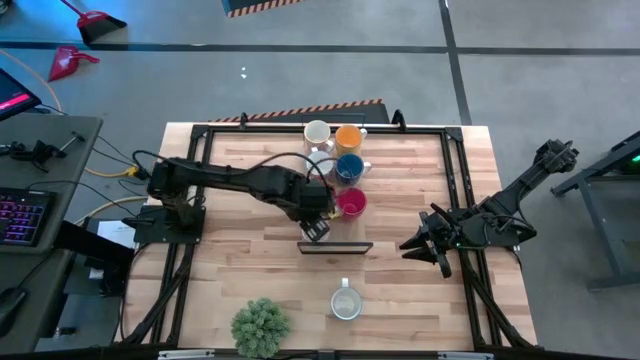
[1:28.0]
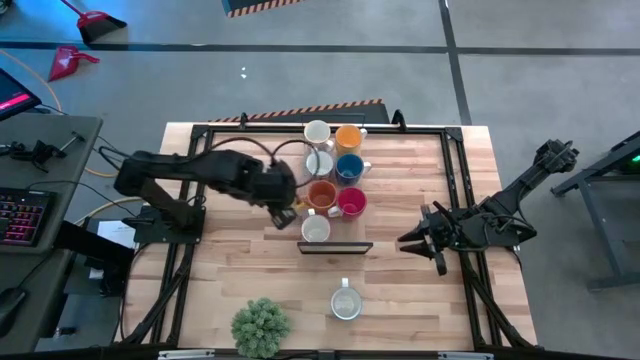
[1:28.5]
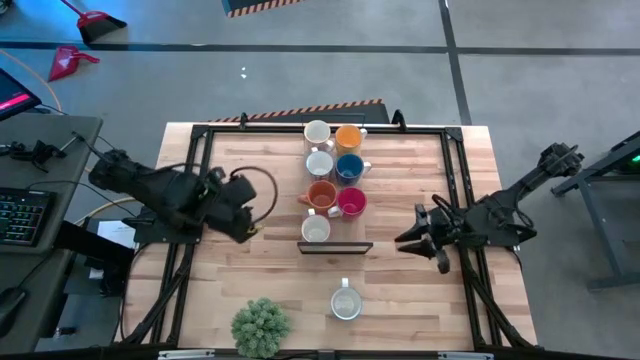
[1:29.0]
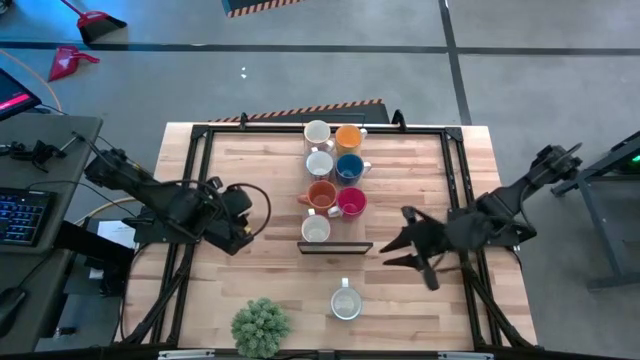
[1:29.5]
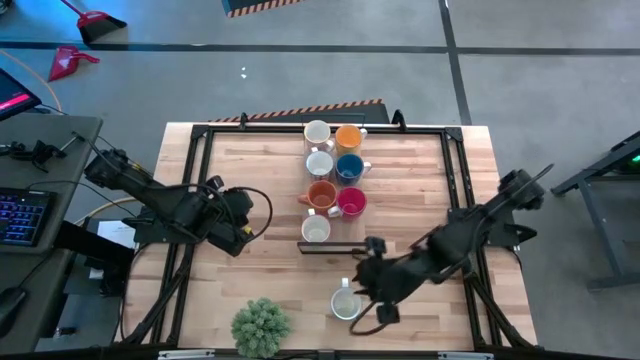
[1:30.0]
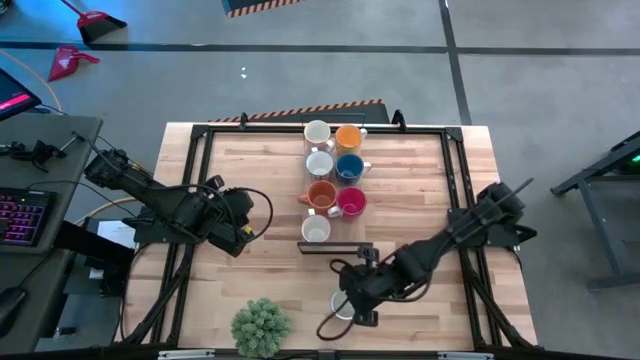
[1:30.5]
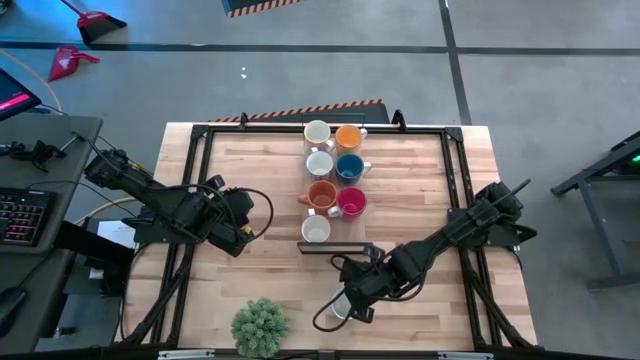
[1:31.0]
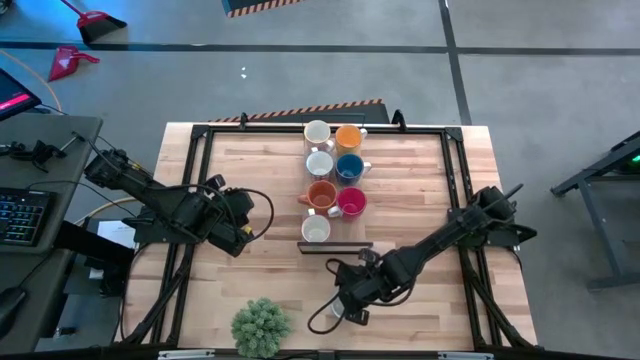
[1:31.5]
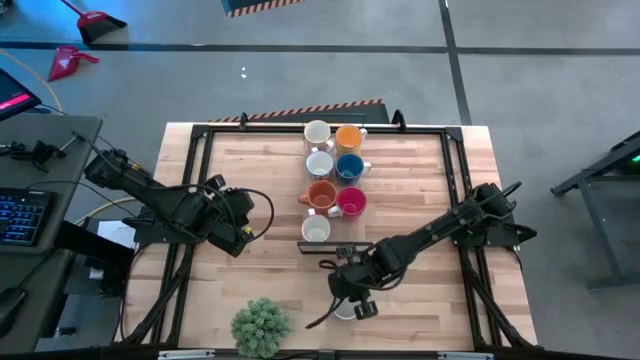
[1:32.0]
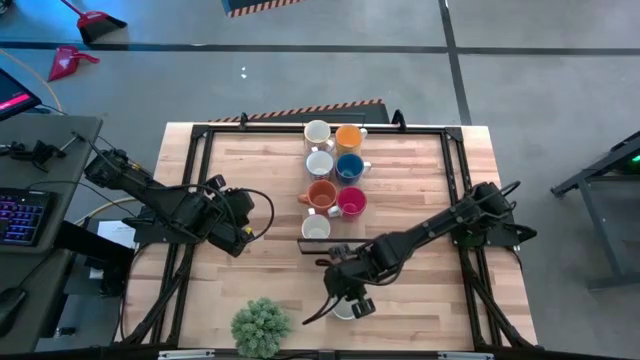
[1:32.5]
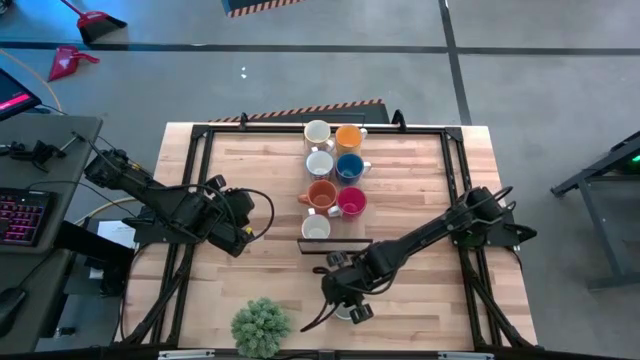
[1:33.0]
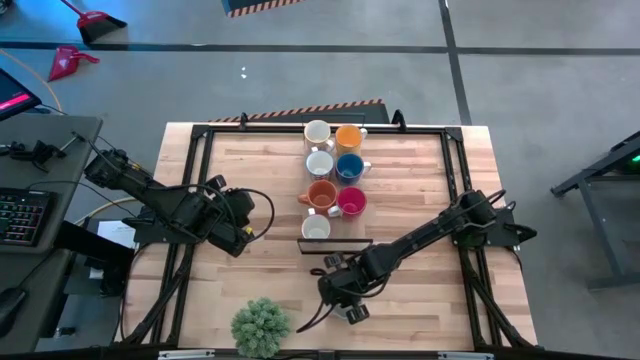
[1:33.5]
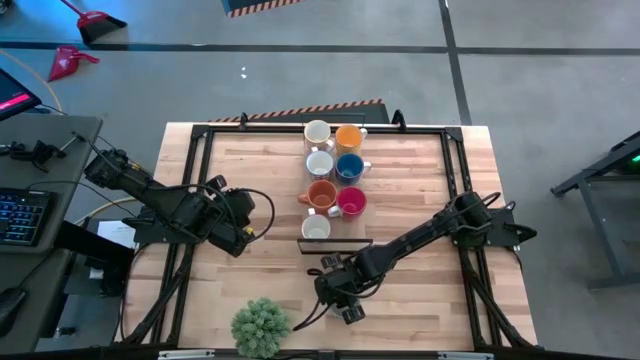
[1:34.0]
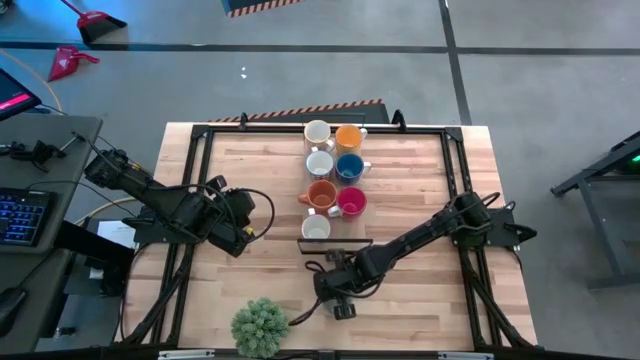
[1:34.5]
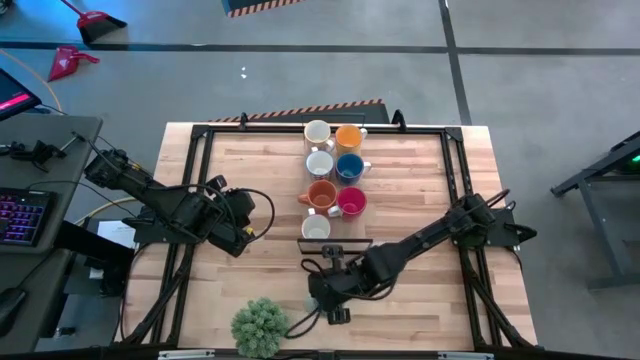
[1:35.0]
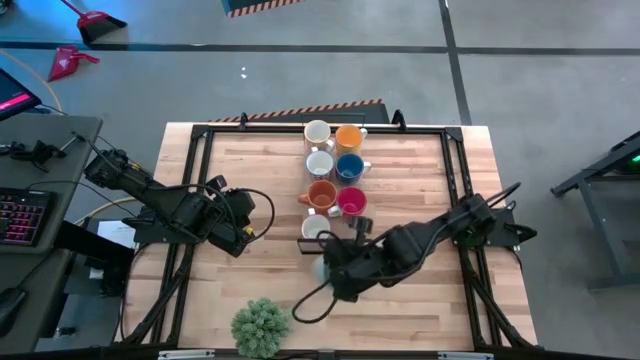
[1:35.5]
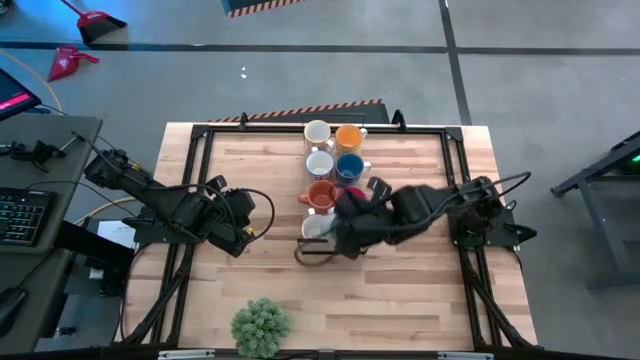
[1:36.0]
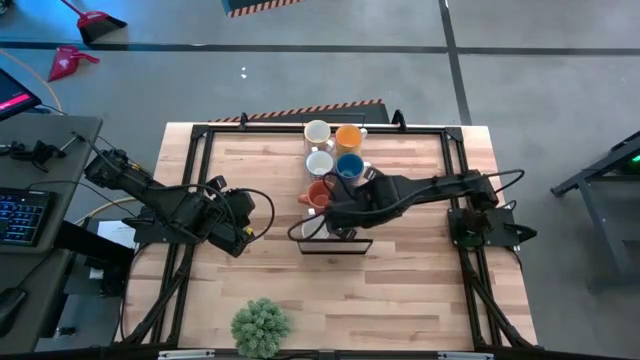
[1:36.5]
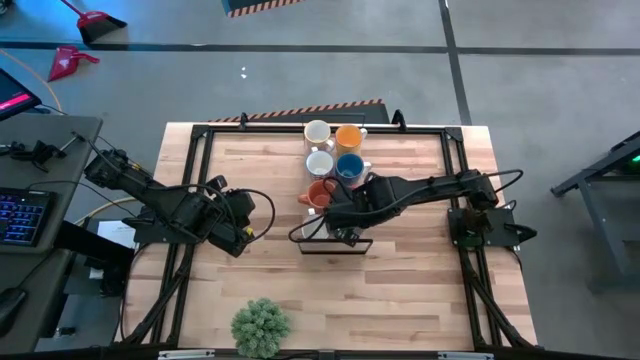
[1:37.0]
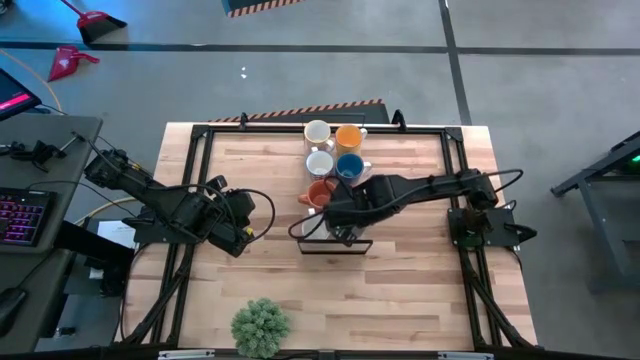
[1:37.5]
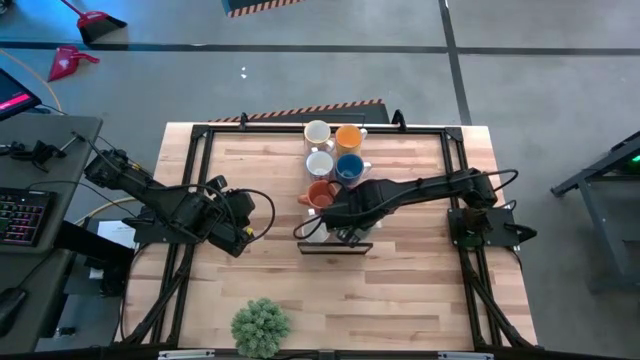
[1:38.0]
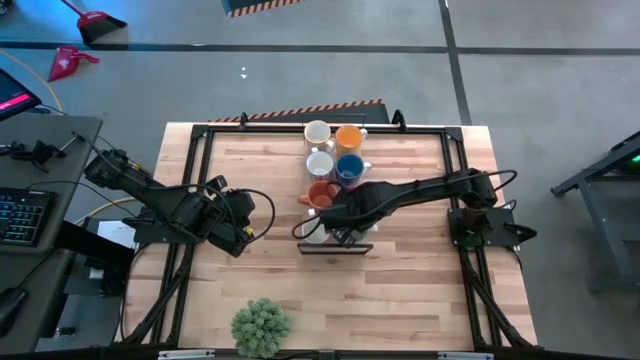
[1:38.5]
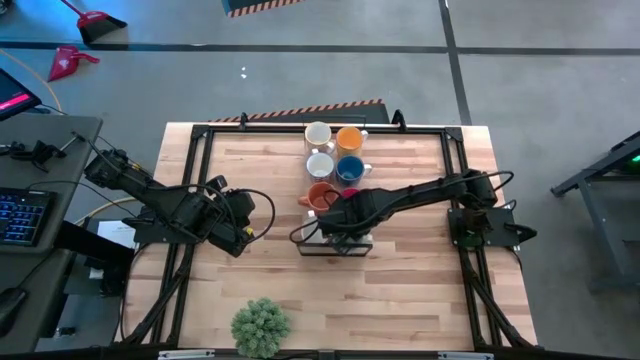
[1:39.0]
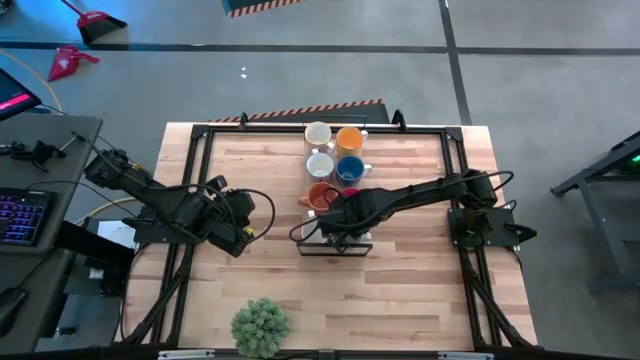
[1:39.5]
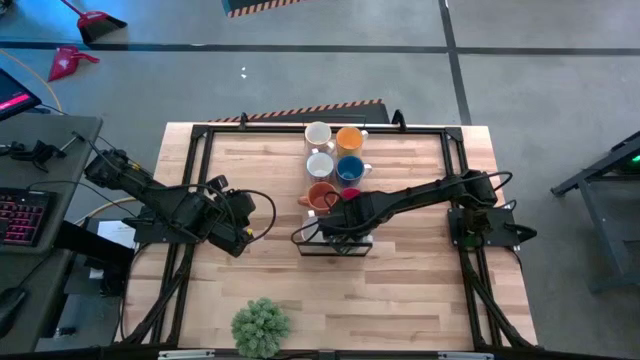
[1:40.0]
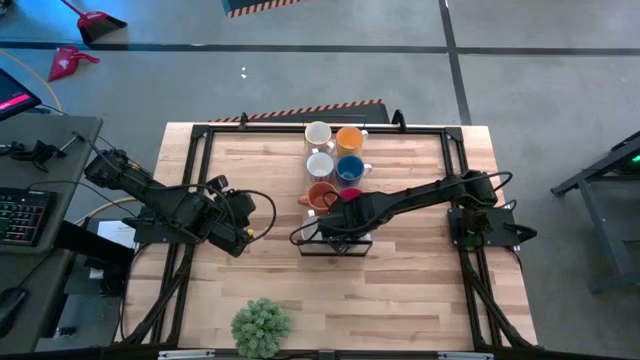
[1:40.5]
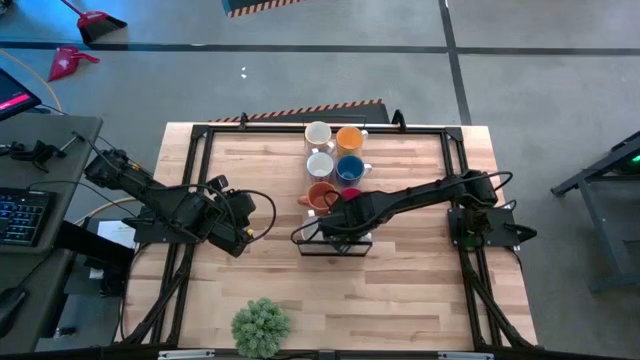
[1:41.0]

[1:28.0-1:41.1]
Task: Place coffee mugs
Put the green cup on the shelf aligned with the other gray cup

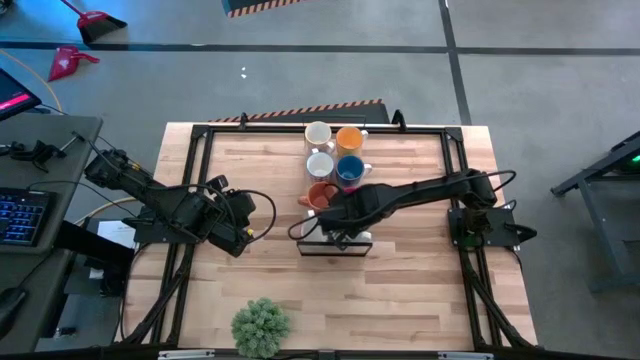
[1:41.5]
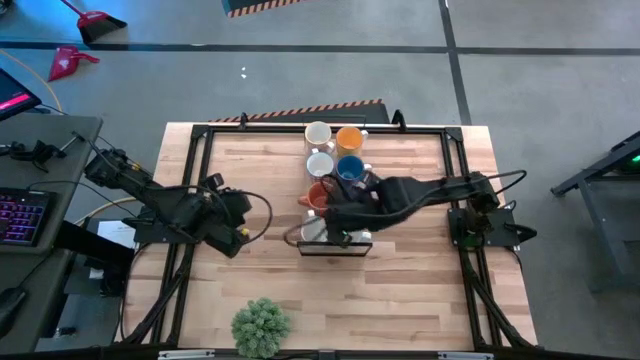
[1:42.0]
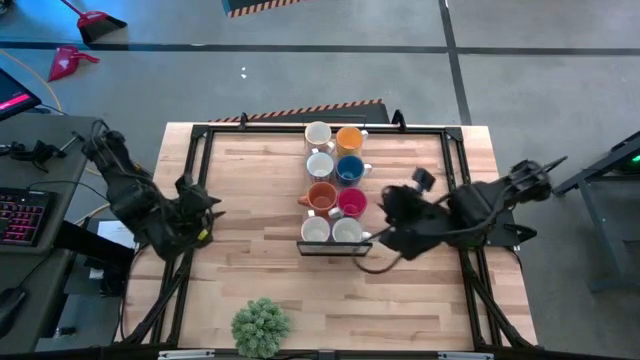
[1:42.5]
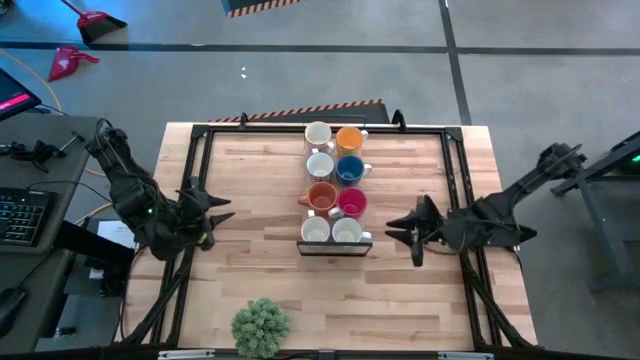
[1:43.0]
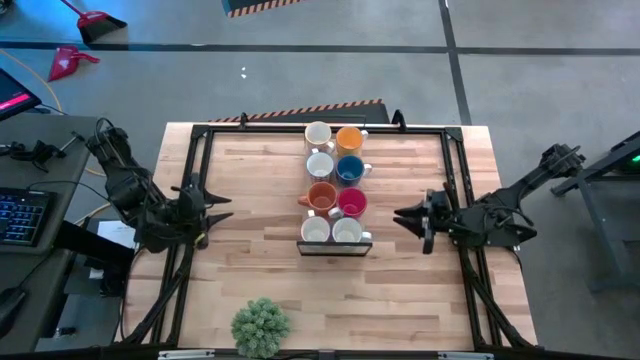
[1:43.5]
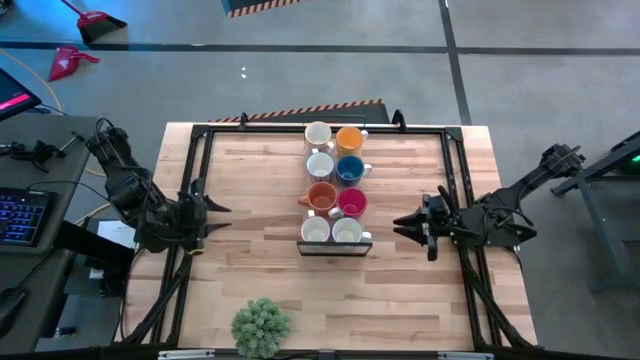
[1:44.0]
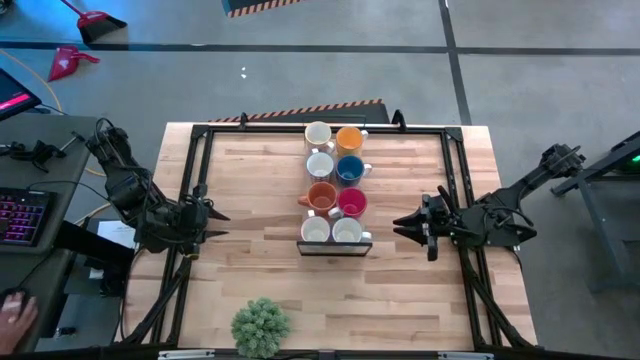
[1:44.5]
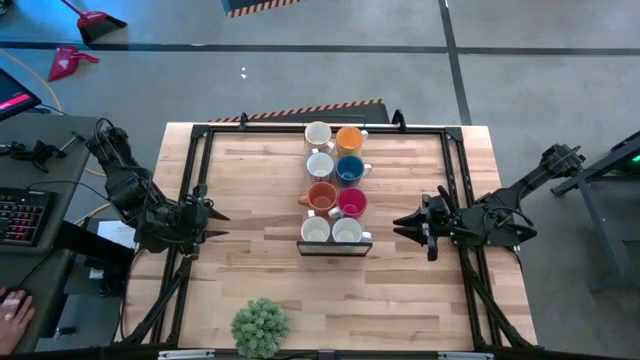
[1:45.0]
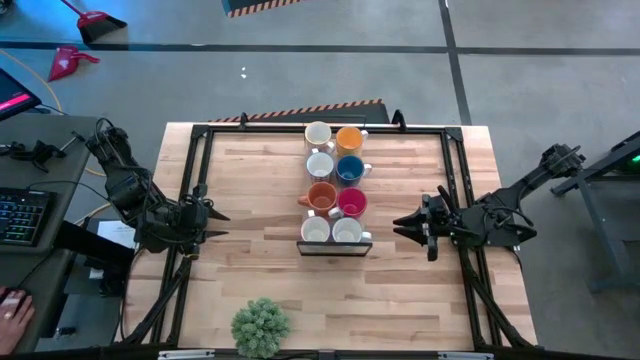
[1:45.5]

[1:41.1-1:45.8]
Return to Home Position
